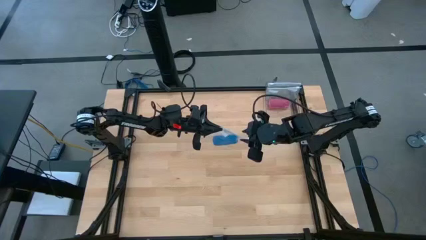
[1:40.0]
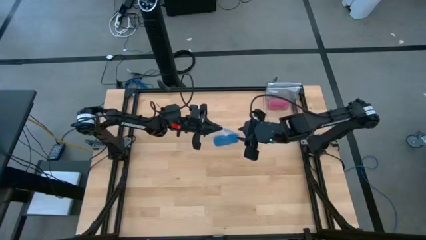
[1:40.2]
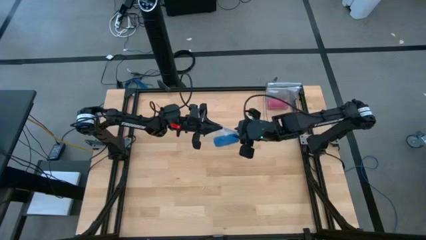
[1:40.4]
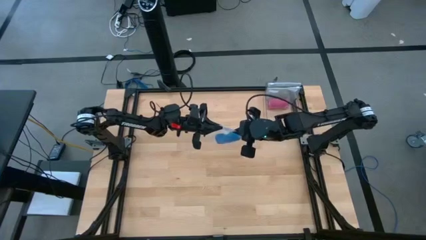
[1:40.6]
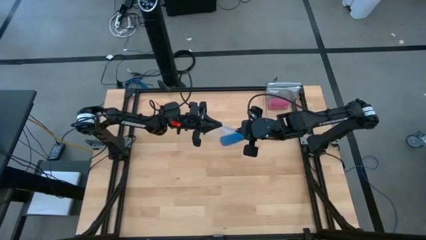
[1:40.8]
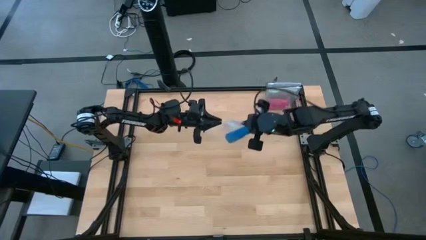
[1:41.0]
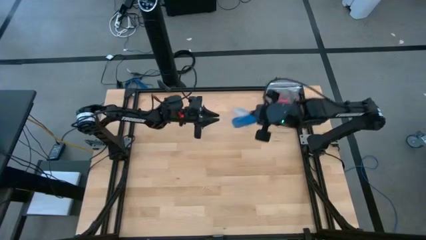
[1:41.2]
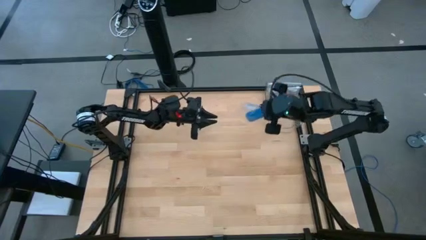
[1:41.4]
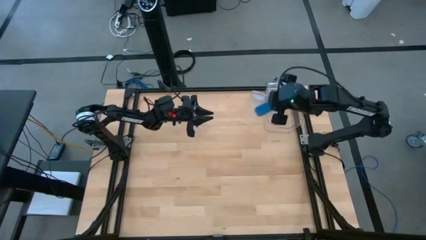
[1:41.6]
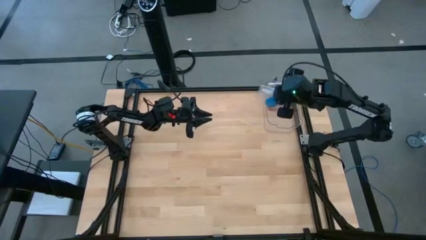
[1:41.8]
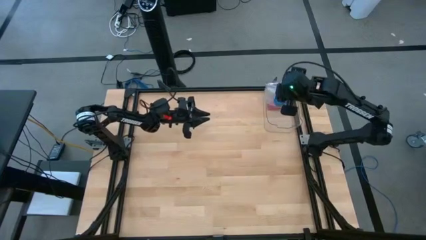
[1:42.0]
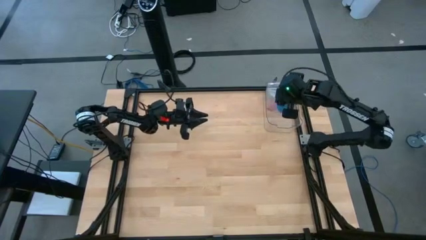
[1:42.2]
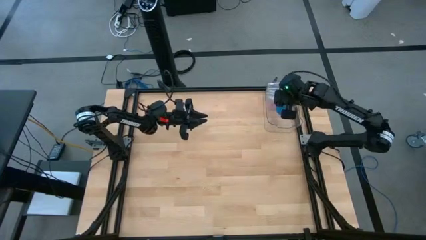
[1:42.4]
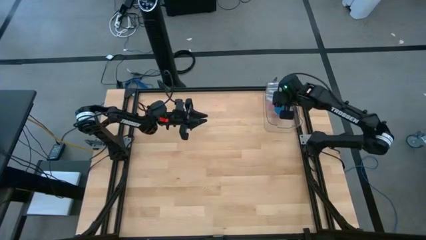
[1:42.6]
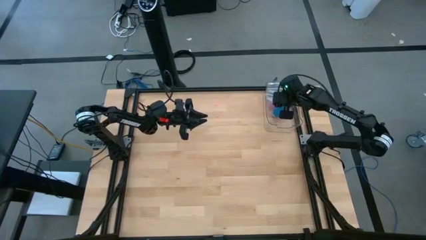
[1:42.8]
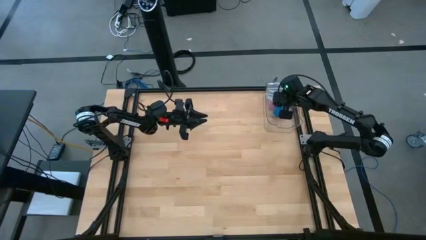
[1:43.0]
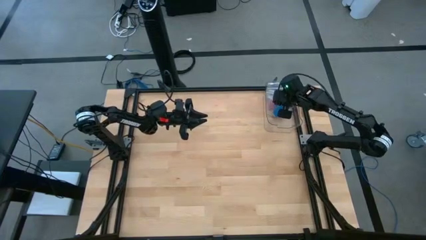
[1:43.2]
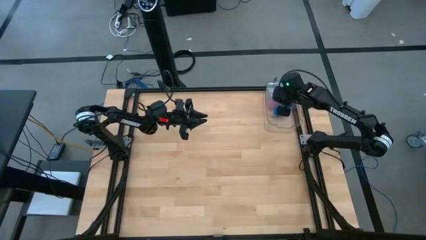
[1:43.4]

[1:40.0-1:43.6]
Task: Roll bandage
Put the transparent zip bag with the blue bandage into the transparent bin

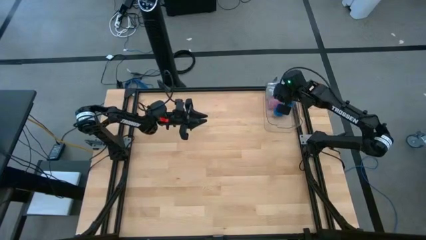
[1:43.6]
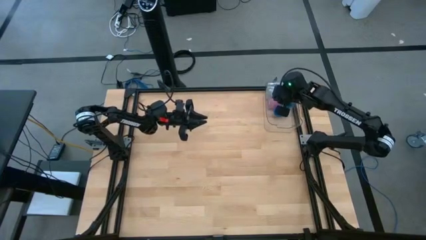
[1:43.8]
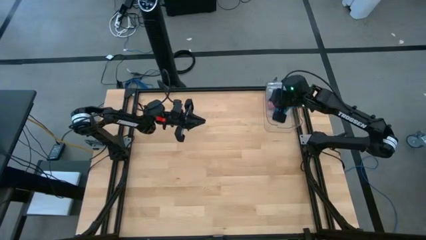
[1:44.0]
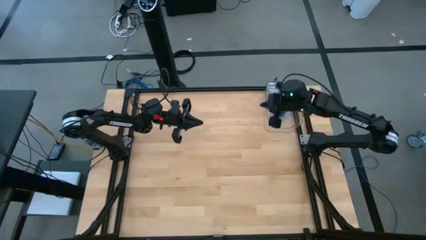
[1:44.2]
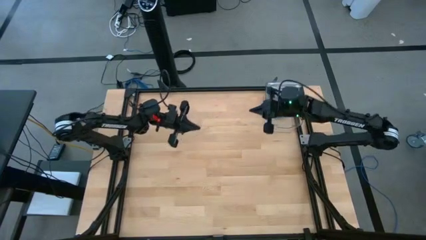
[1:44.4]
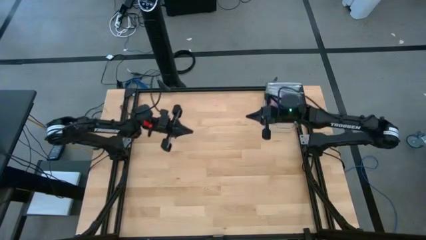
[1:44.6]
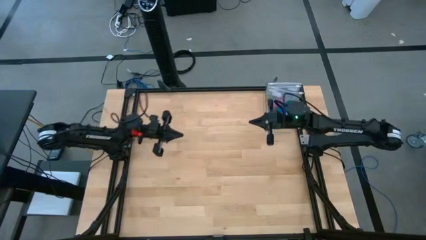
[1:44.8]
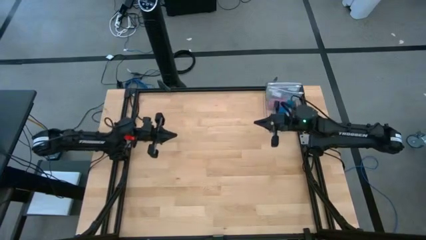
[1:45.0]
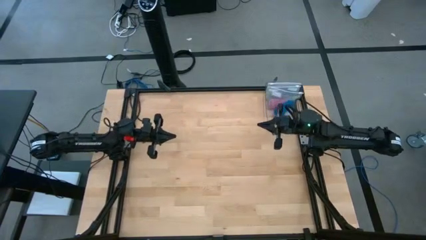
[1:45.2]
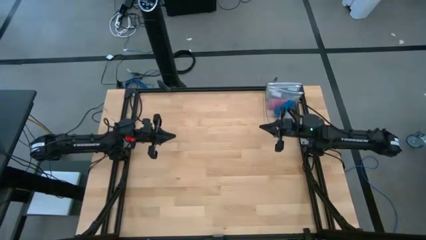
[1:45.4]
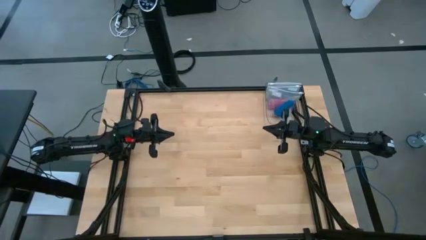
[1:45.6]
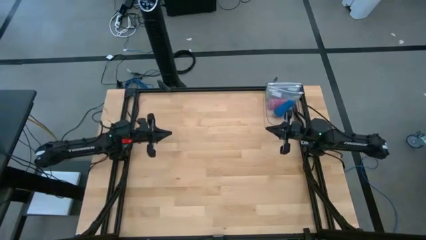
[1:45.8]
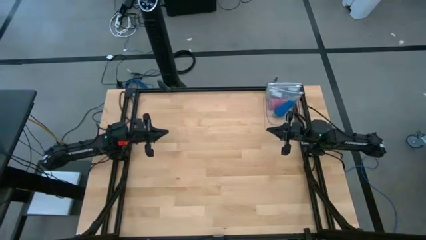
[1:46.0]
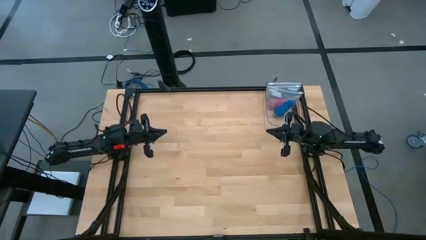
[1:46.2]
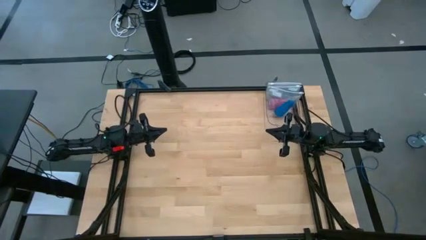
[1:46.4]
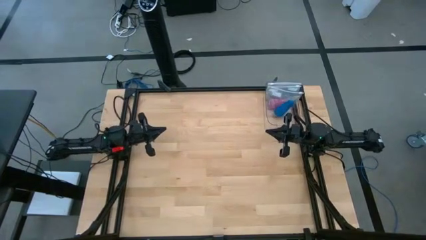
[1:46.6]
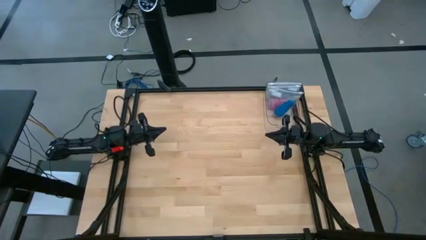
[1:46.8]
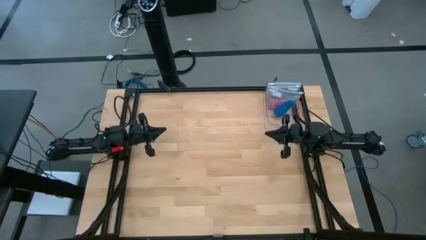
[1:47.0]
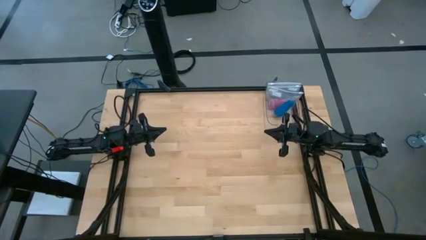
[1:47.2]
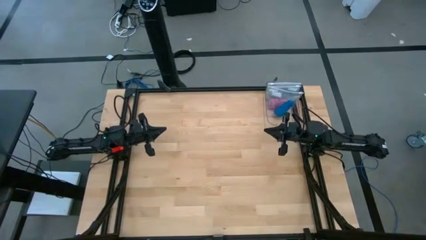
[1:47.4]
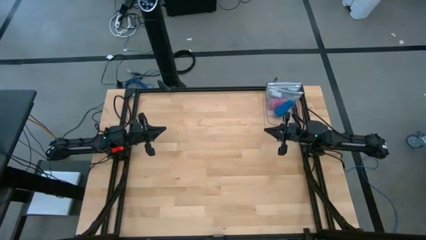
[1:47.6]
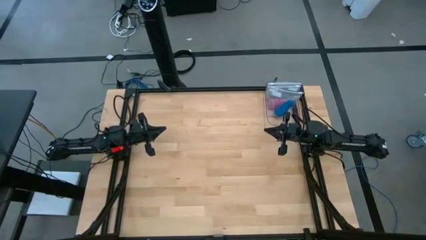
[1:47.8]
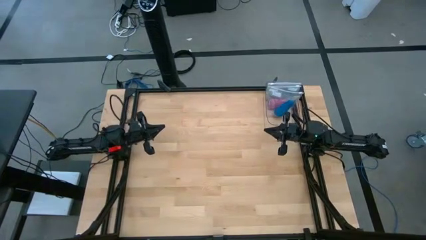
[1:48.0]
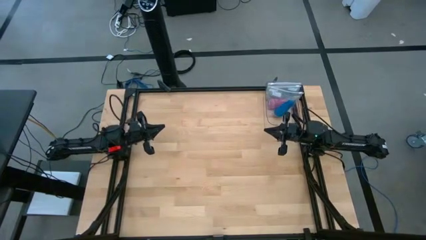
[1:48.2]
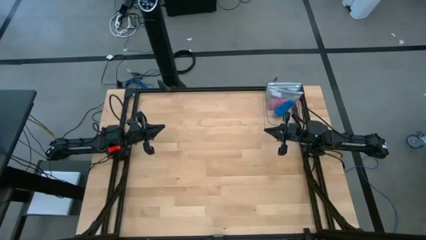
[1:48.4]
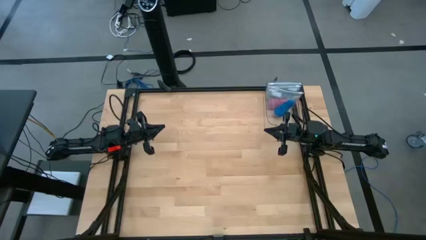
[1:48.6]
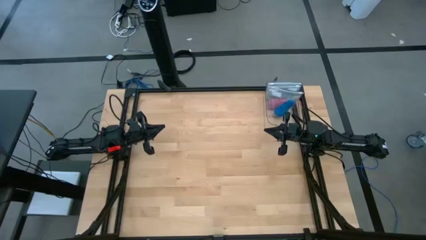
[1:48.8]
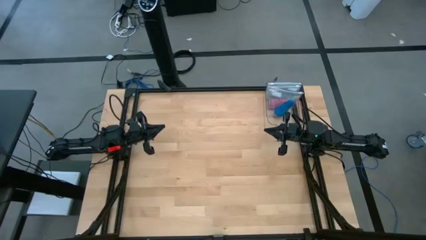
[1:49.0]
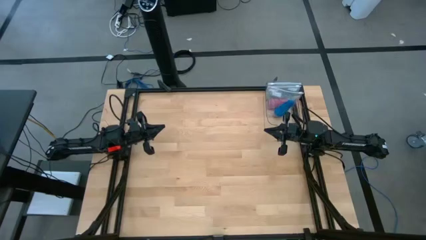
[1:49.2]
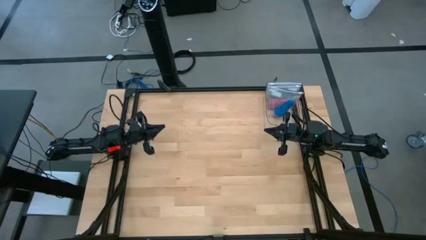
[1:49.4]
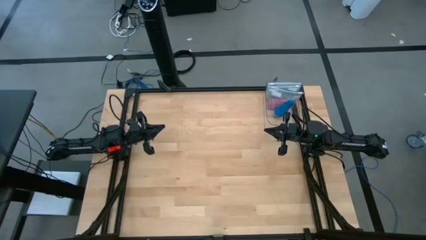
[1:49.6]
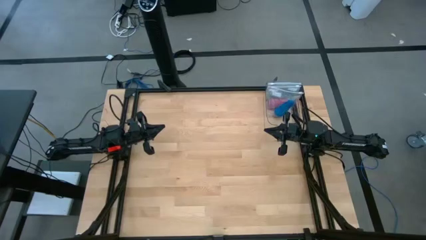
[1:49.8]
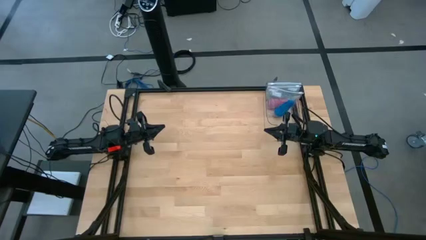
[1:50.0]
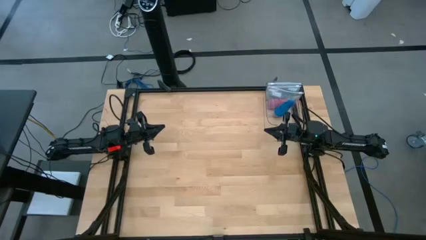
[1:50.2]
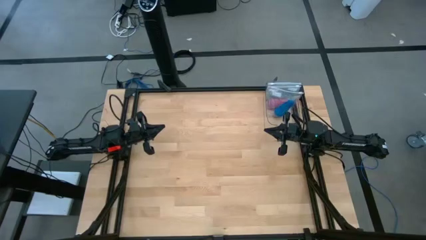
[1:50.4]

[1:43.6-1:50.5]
Return to Home Position

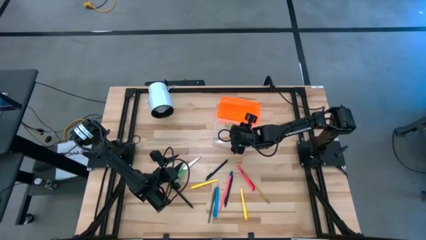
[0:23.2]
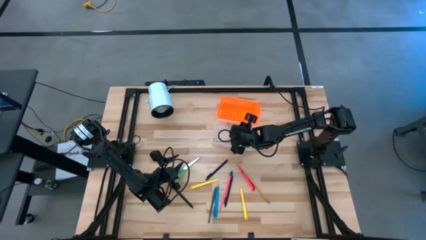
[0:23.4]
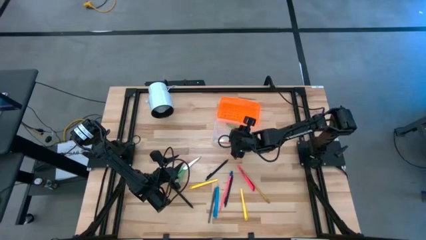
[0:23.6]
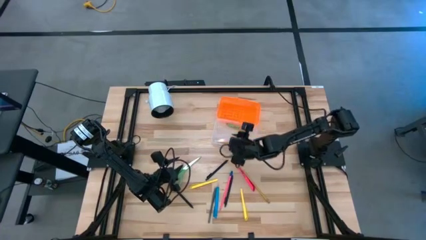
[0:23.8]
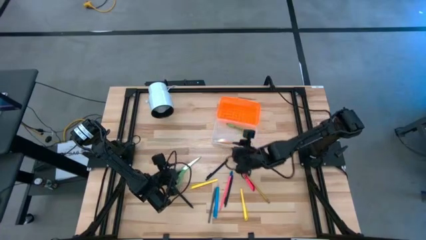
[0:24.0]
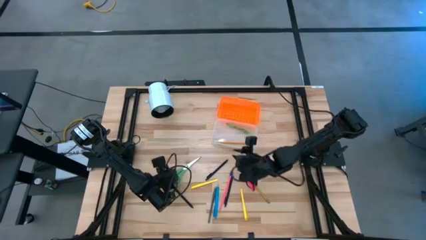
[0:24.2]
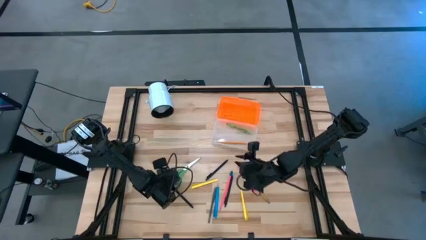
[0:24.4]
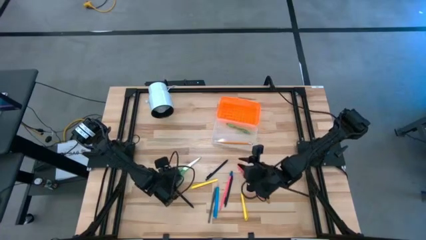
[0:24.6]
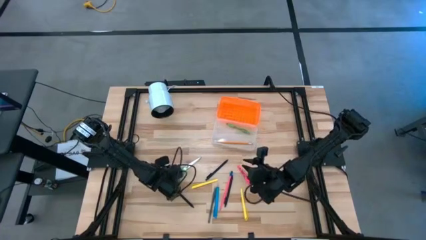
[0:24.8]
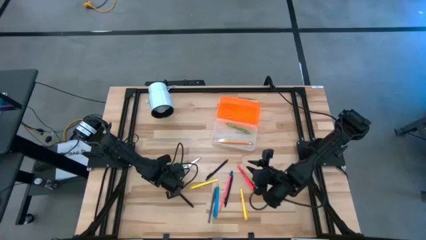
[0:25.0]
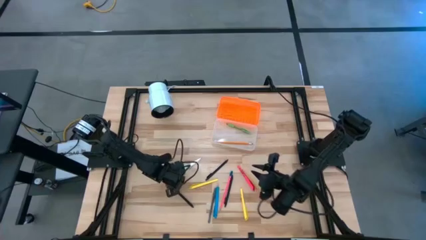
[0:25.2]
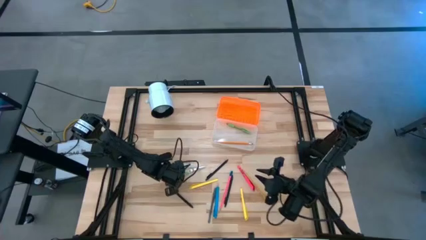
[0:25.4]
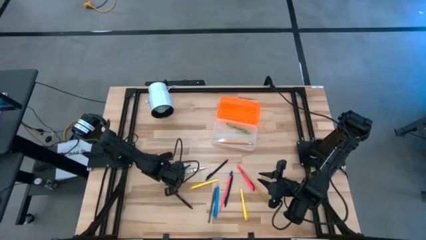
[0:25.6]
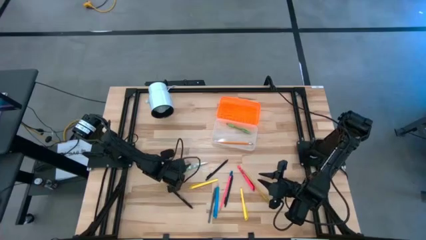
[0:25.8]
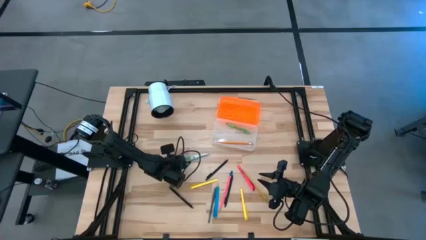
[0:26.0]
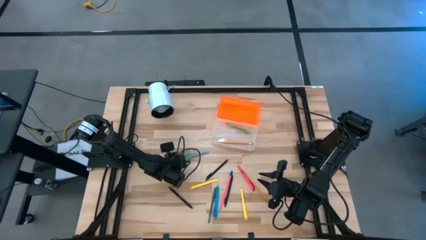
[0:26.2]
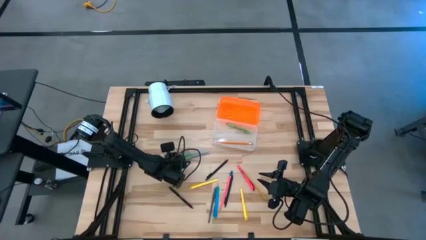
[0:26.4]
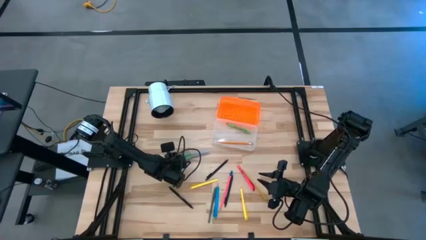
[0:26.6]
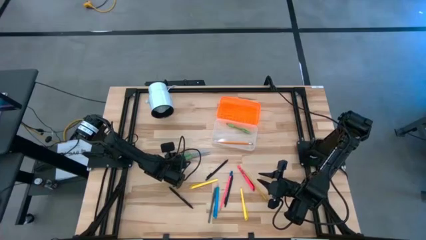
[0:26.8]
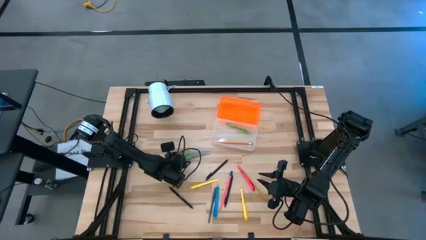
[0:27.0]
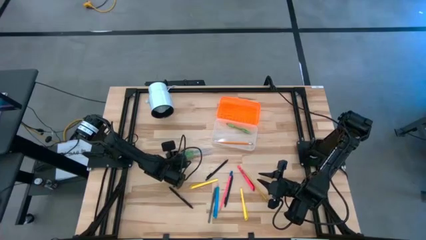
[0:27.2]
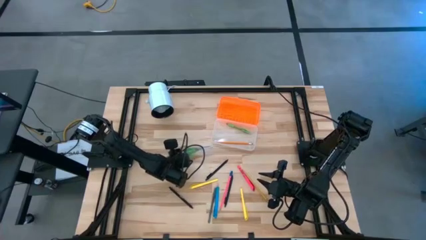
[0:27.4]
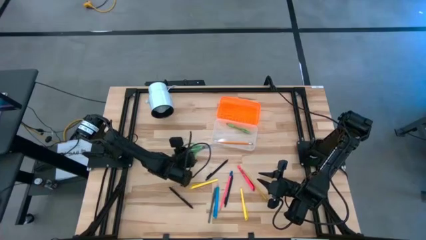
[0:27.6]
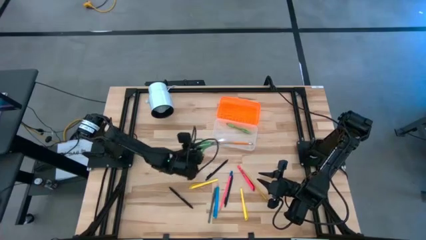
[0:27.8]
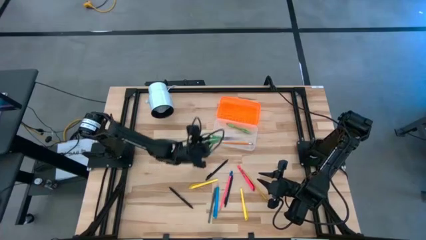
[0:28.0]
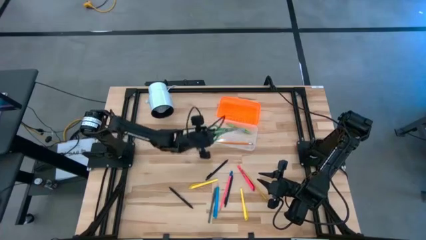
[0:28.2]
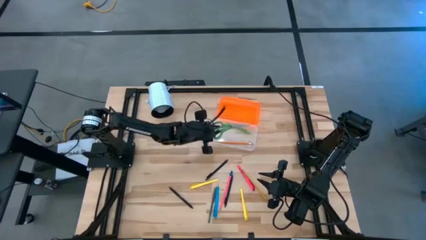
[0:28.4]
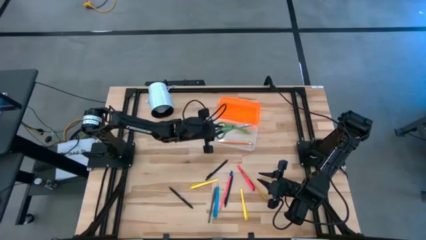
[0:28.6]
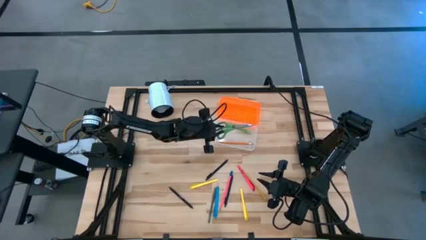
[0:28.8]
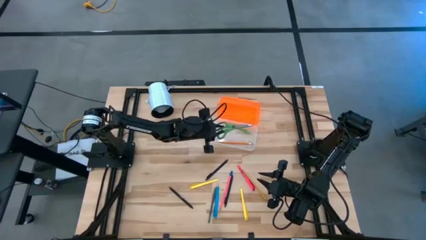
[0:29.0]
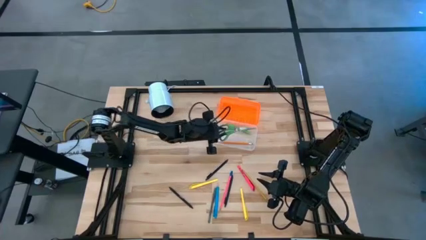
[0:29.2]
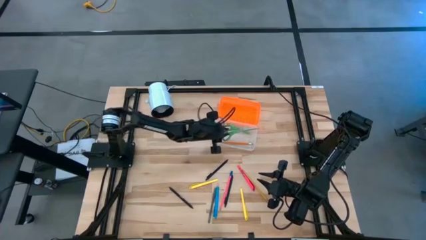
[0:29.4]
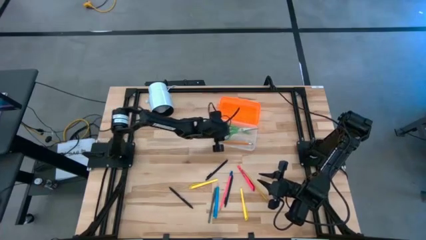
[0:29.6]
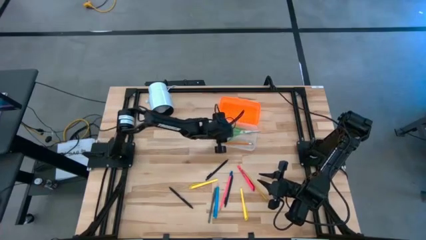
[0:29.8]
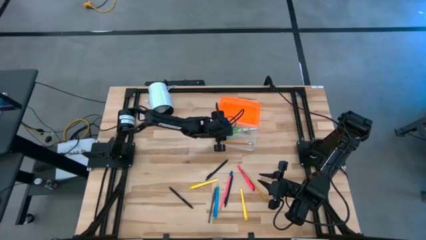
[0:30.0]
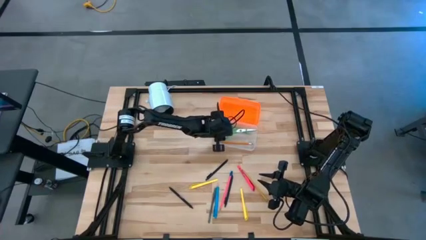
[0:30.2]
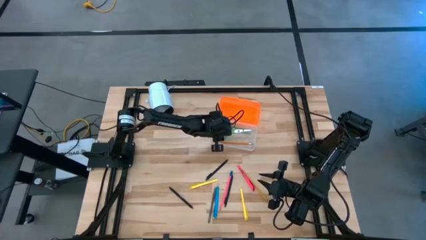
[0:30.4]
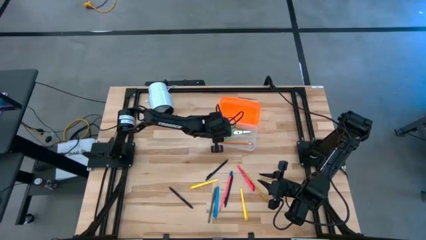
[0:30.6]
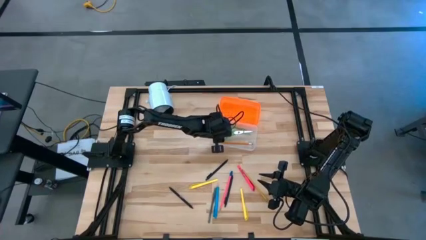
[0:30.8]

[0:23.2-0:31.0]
Task: Pick & place school supplies into a supply box
Put the green scissors into the supply box
